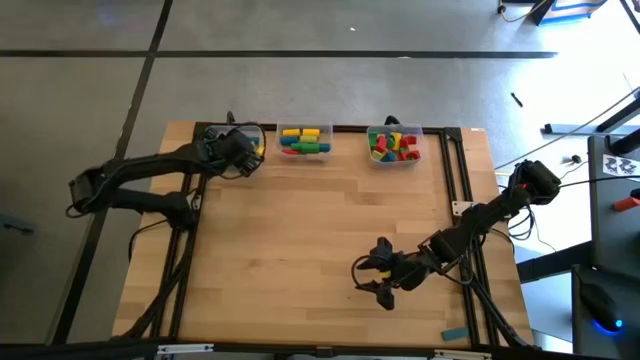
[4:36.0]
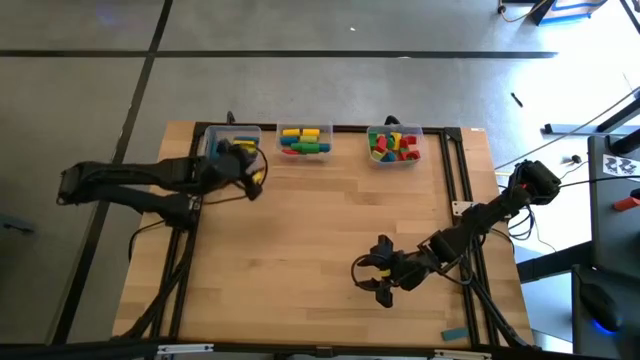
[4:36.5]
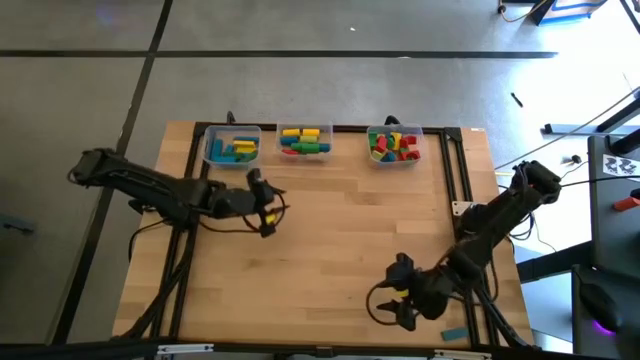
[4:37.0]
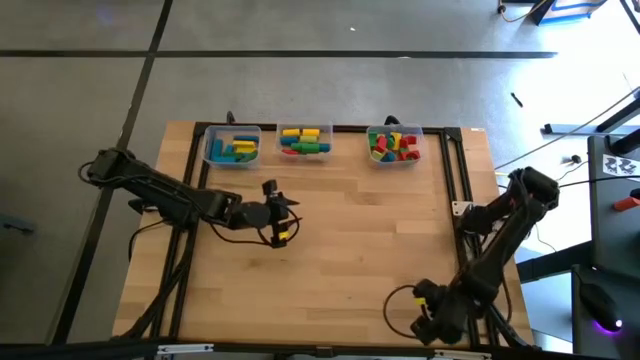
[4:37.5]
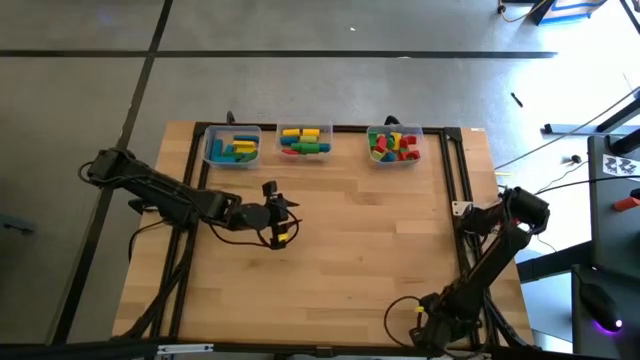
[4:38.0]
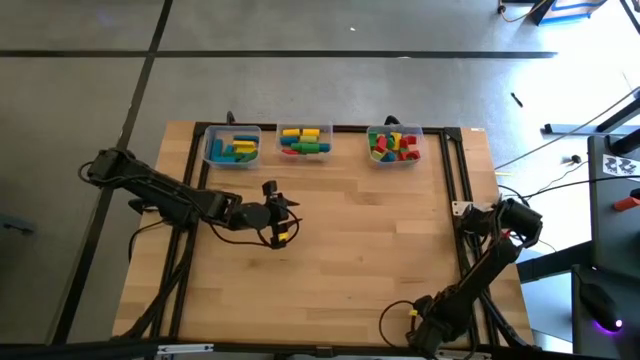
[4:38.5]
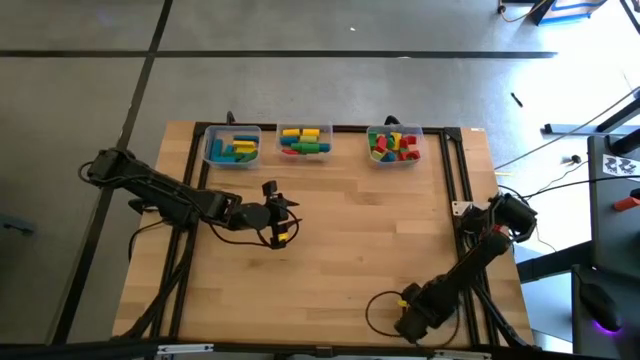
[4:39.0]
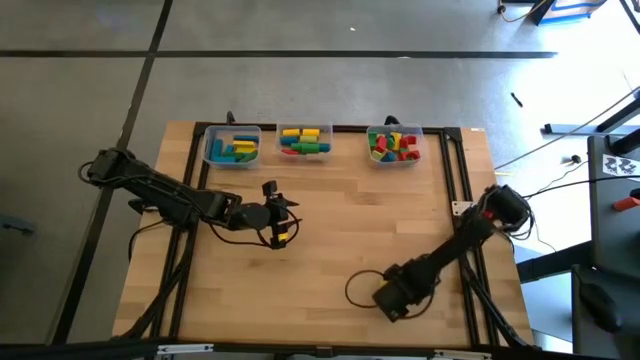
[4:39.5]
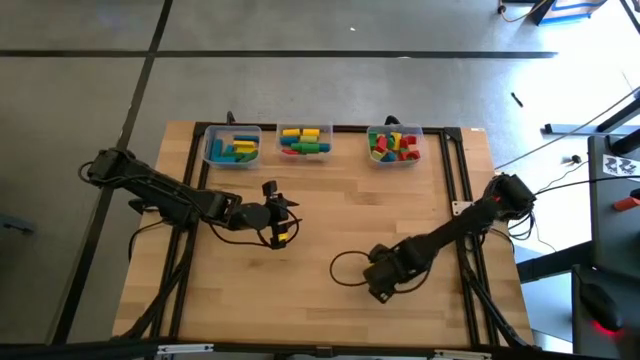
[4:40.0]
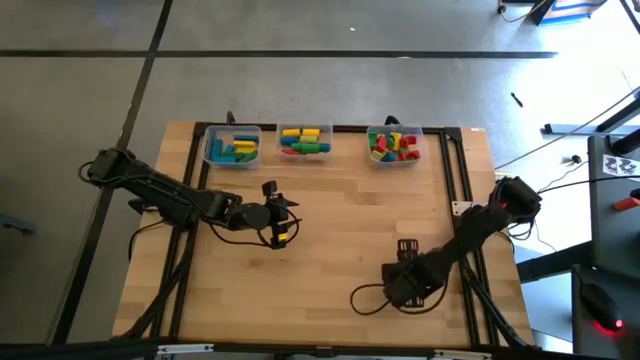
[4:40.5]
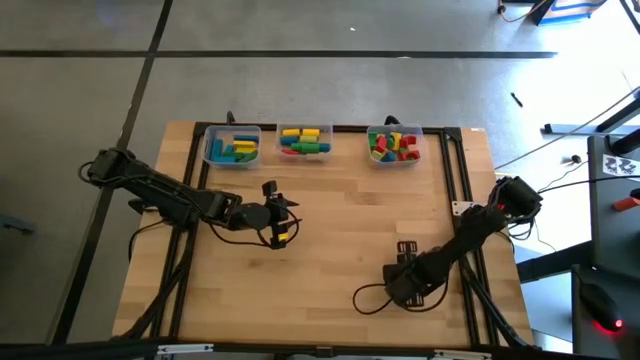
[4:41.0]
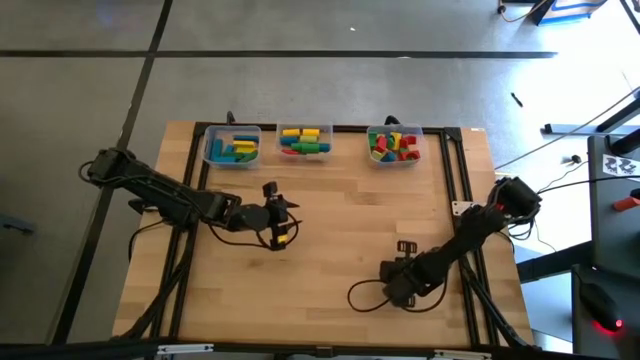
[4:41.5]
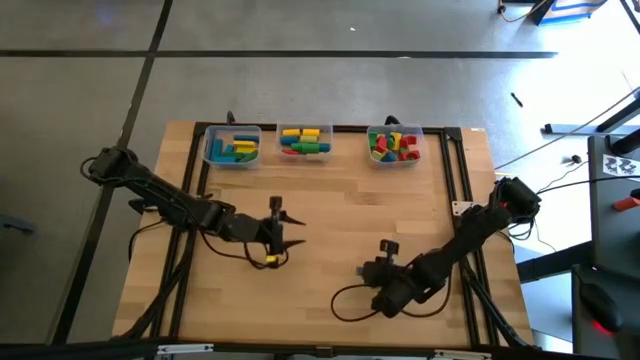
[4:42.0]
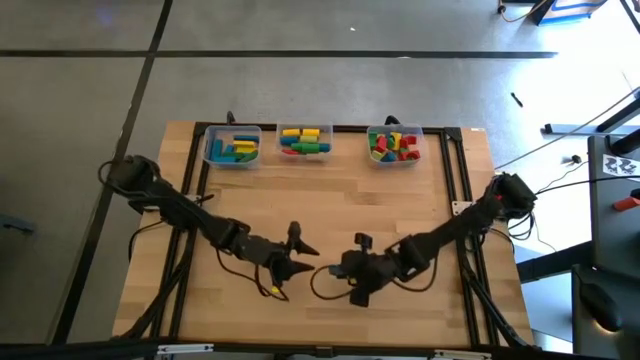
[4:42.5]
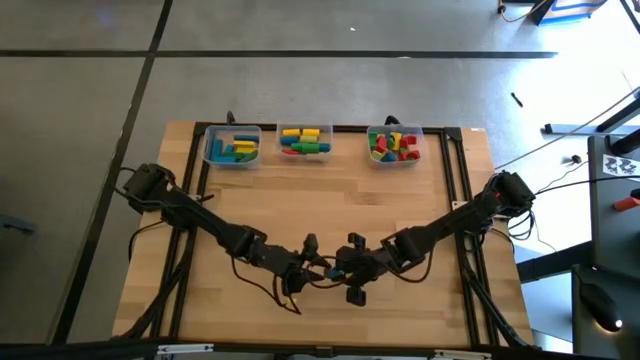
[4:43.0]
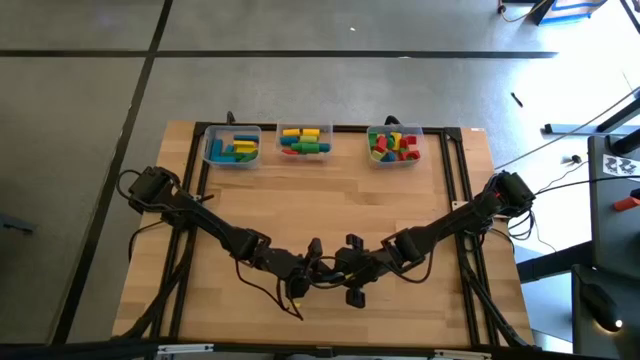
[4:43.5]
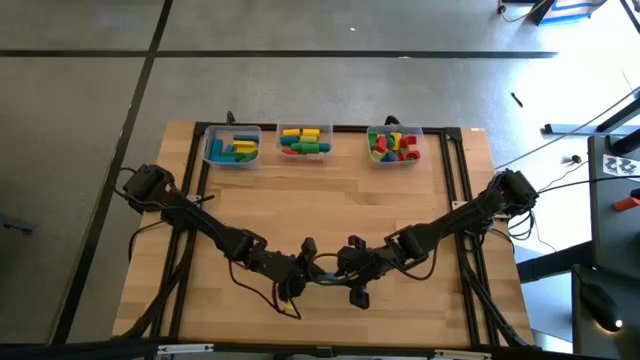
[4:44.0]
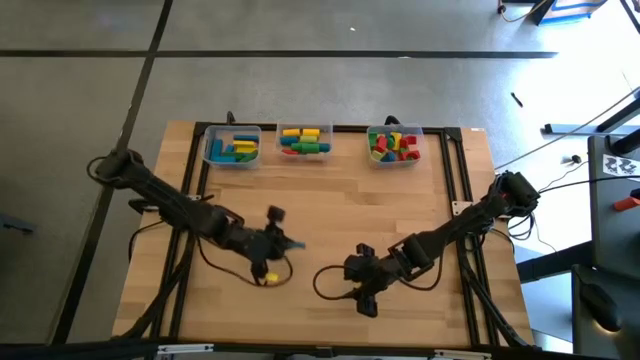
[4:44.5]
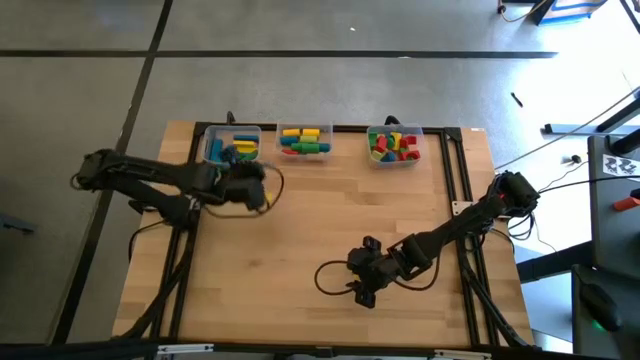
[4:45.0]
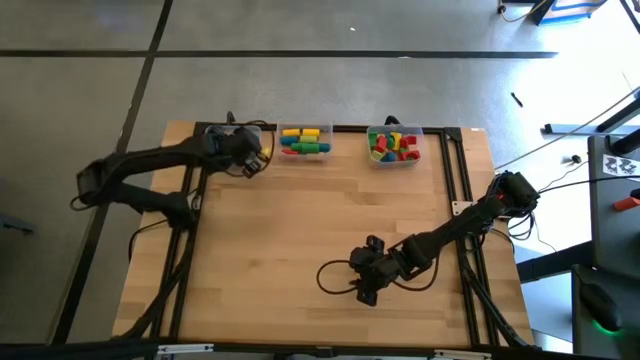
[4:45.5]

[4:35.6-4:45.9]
Task: Sort blocks by size
Put the blue rectangular block into the left transparent bin

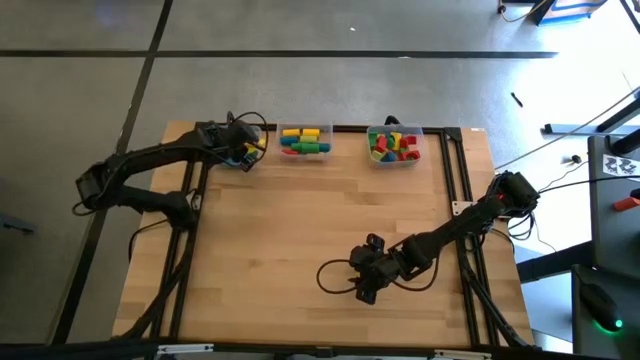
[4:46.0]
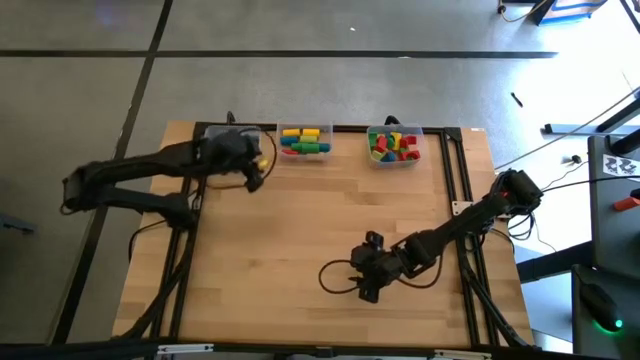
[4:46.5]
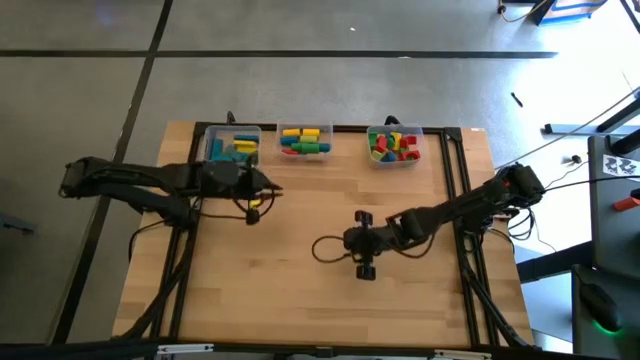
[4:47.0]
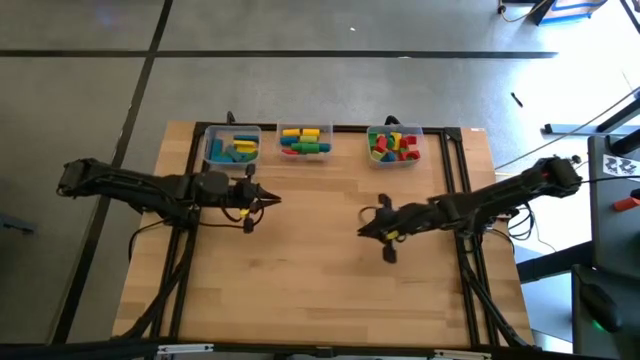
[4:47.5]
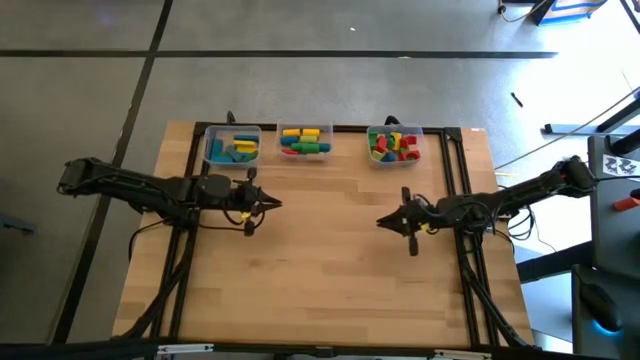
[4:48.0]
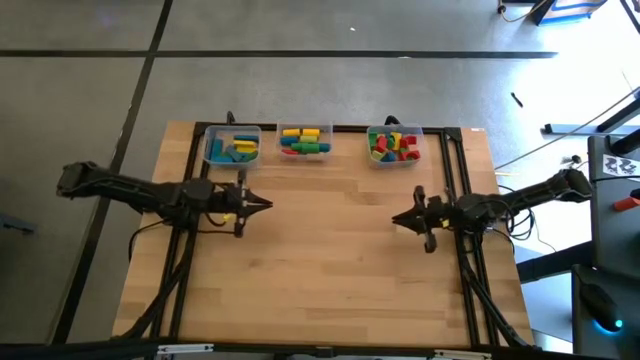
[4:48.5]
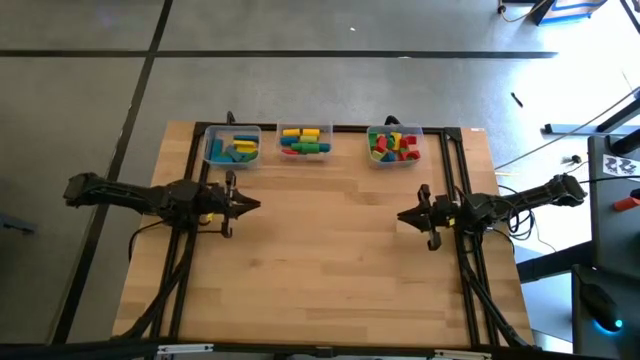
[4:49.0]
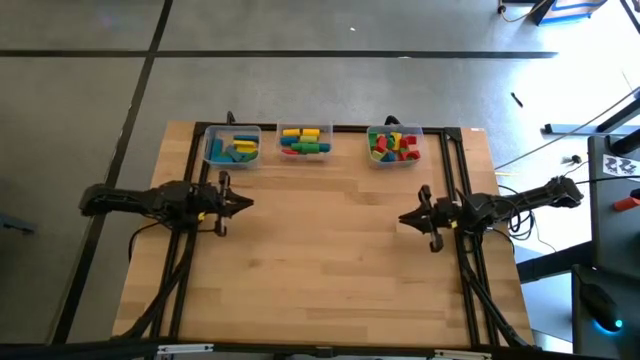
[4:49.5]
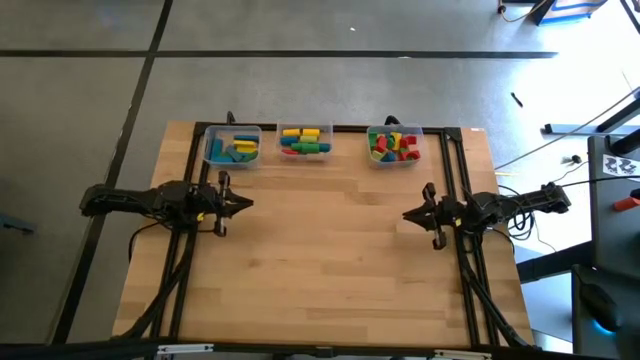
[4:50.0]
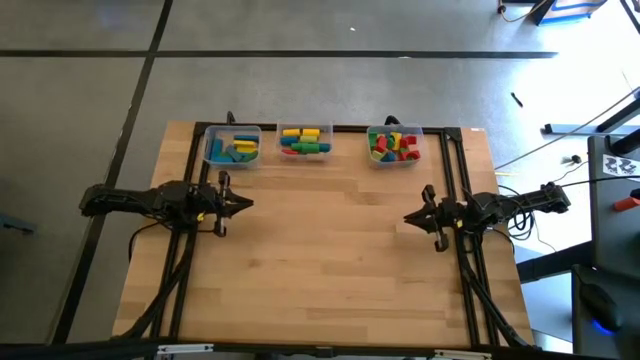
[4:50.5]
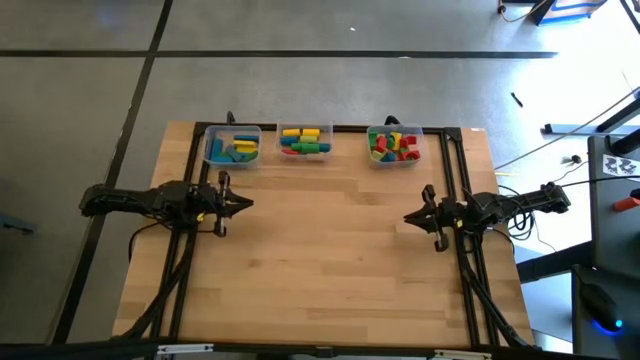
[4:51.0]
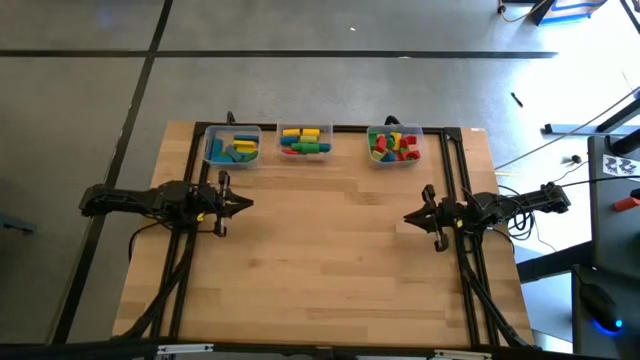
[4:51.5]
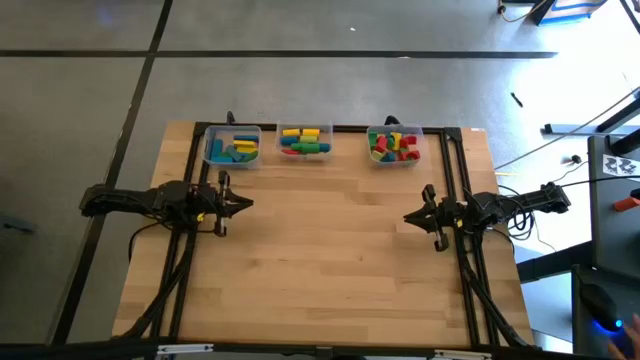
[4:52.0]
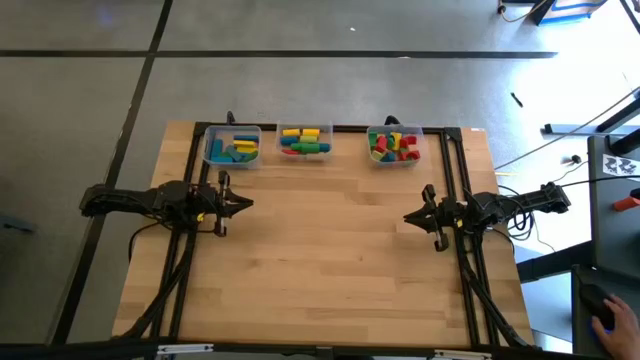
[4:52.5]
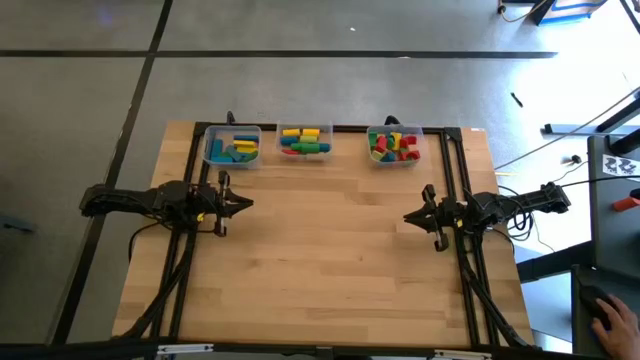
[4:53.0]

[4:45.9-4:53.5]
Return to Home Position

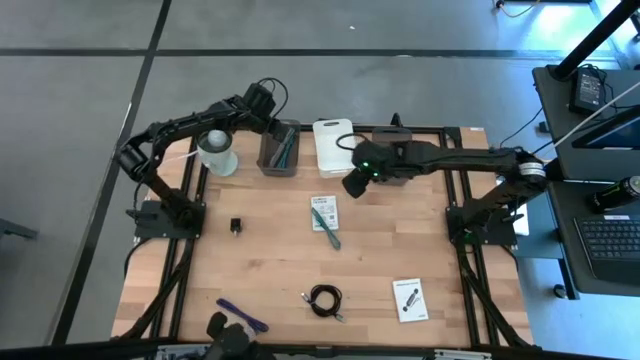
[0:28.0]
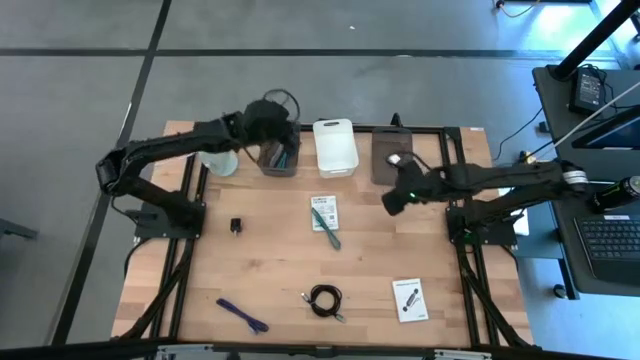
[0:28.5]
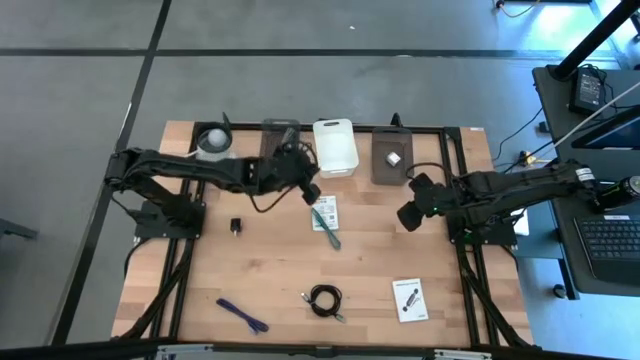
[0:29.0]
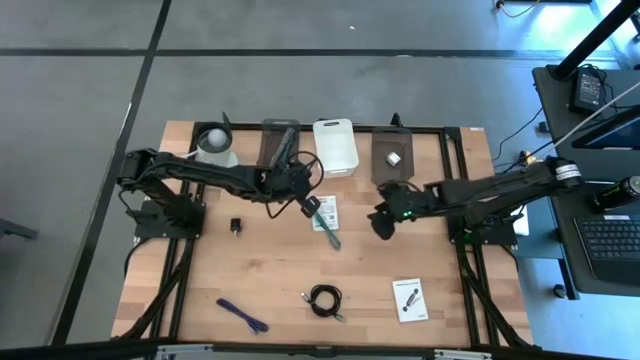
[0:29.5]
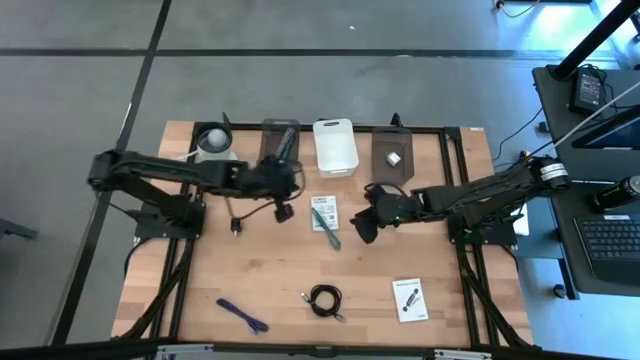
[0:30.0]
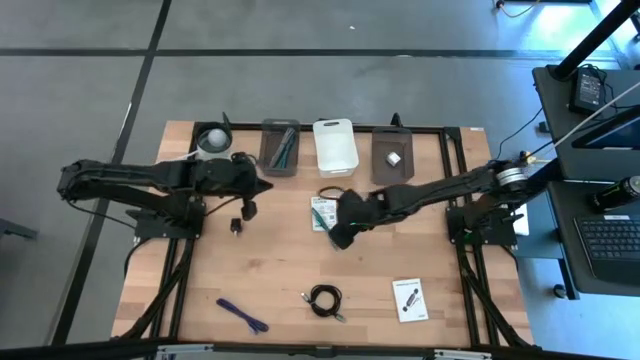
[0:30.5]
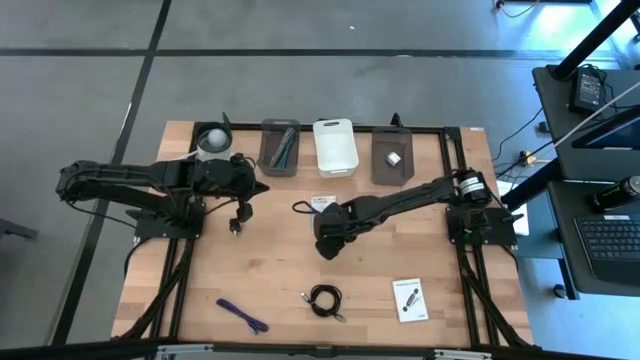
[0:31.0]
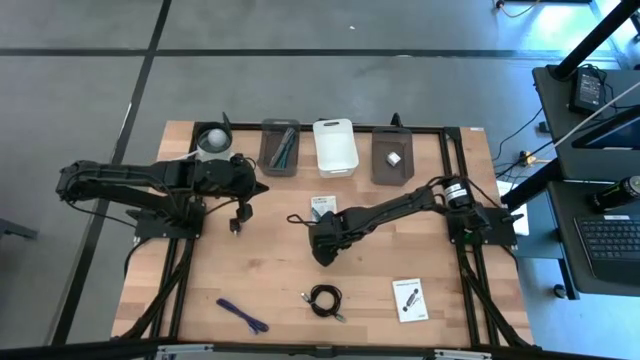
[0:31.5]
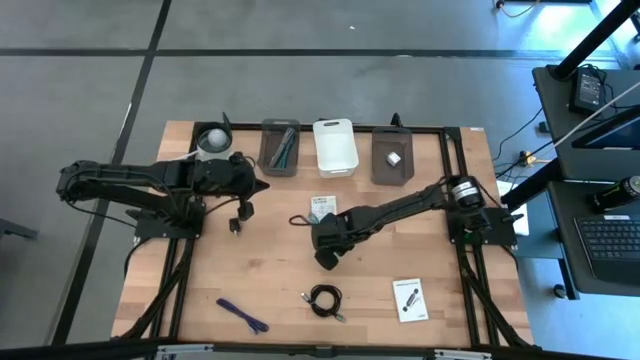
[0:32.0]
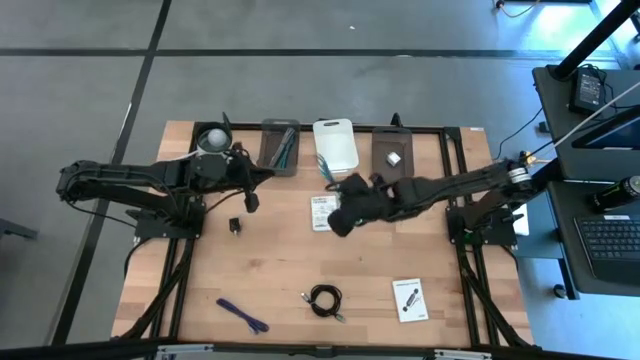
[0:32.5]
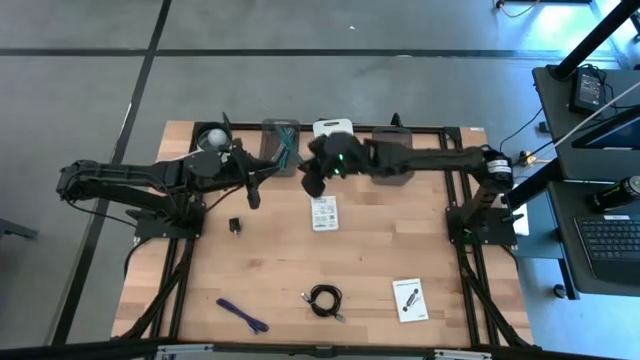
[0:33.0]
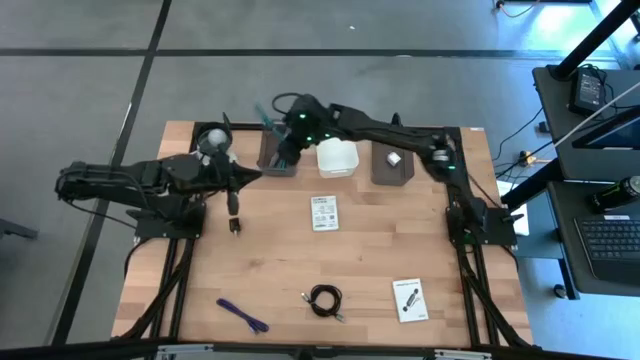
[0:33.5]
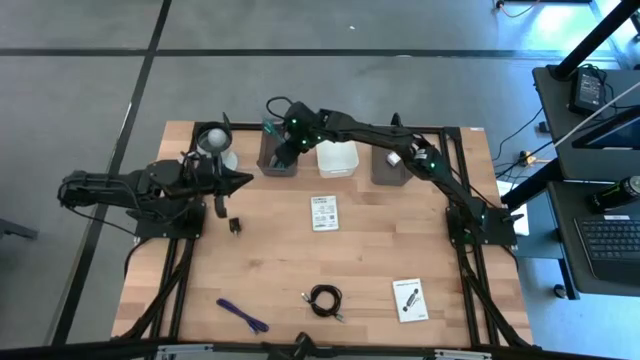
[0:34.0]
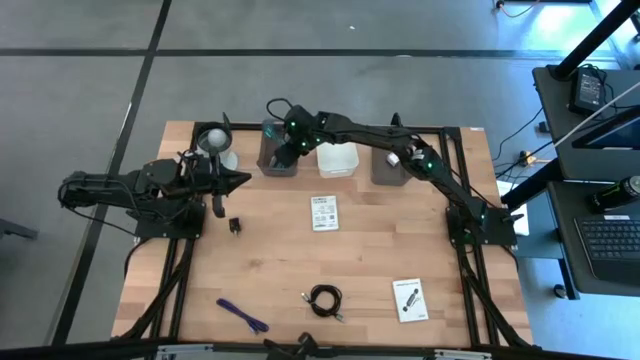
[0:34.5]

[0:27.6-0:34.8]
Task: Pick and place items into bin
Put the blue charger cable into the left black bin
